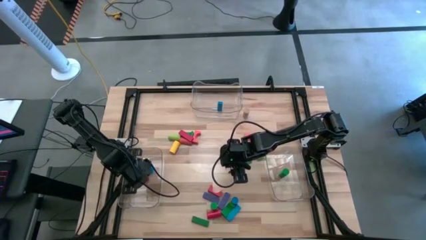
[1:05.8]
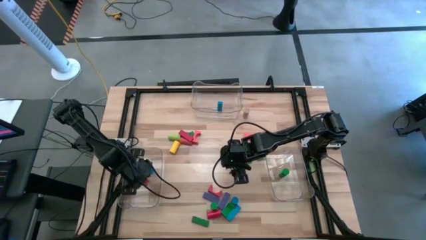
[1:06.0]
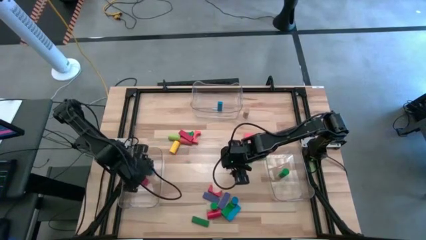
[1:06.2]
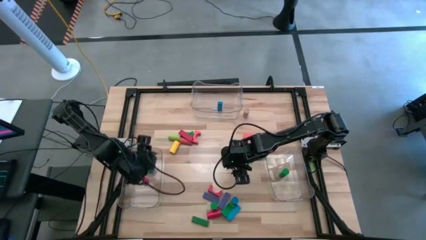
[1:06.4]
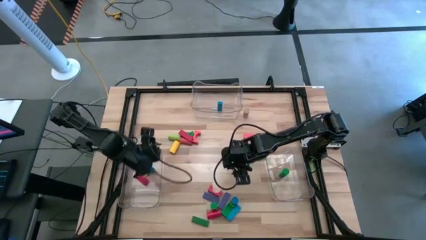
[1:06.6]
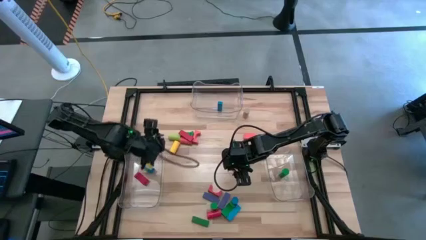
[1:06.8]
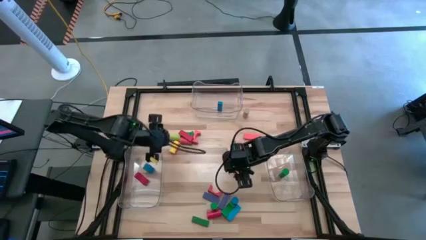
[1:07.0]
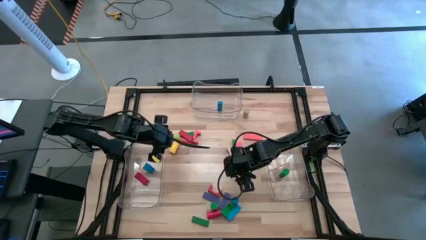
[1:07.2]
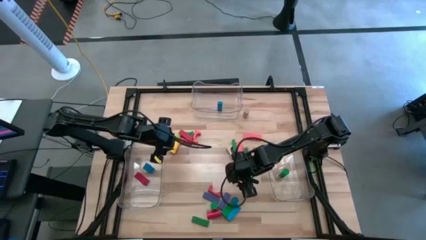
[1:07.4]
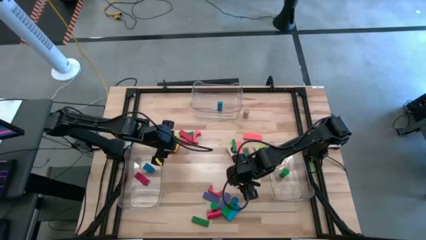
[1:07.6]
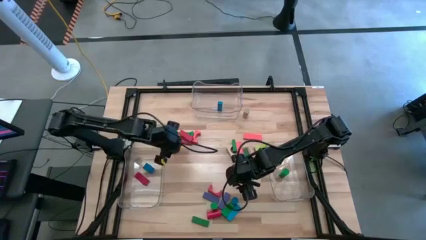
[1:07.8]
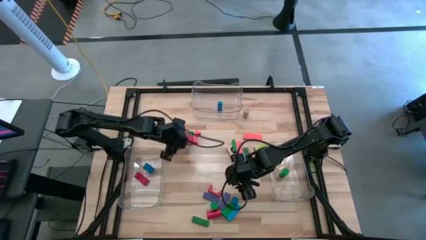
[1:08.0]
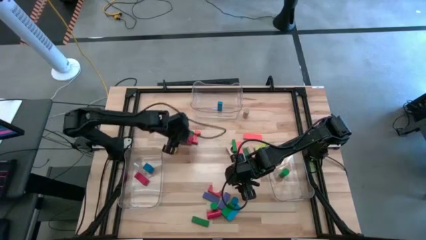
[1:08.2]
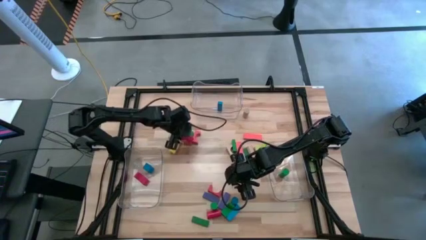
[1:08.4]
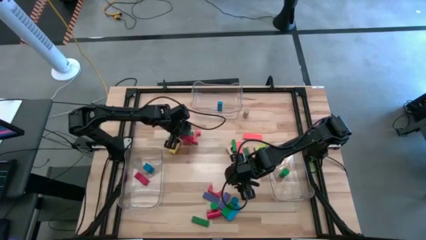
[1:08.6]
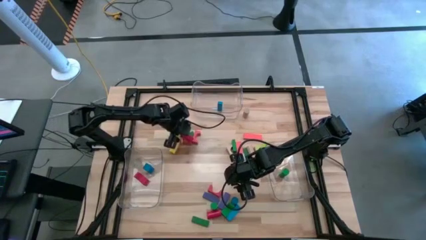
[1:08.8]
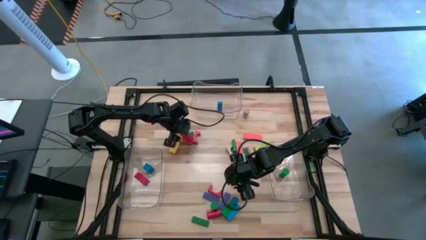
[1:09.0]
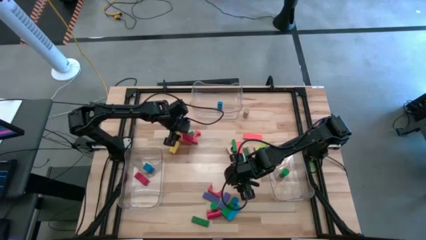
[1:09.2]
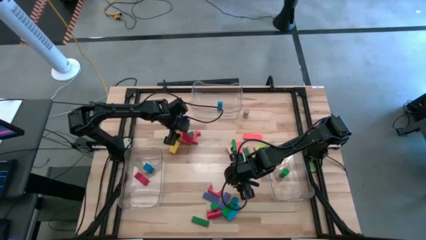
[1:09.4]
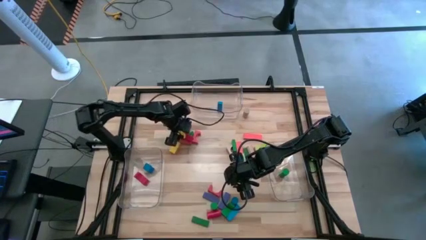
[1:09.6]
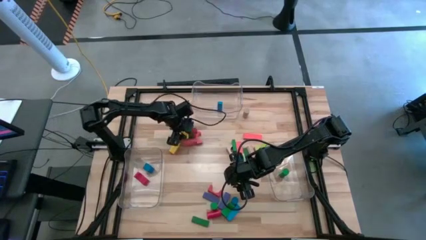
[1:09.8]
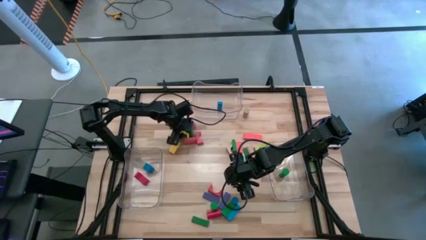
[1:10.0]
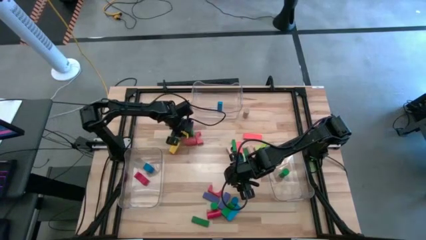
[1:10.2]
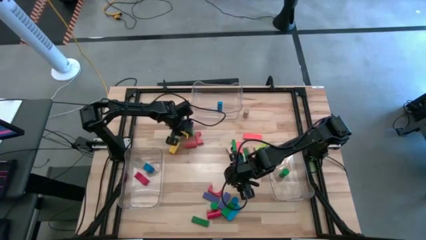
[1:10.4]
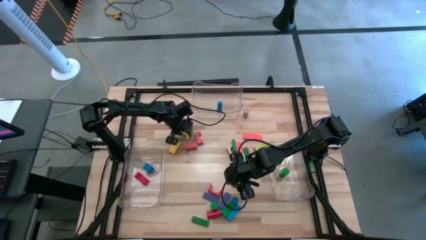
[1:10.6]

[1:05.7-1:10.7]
Task: Sort blocks by size
Put the red rectangular block into the top transparent bin

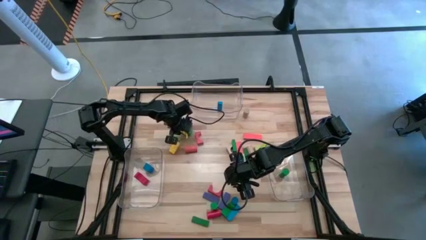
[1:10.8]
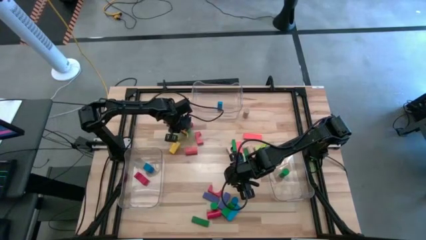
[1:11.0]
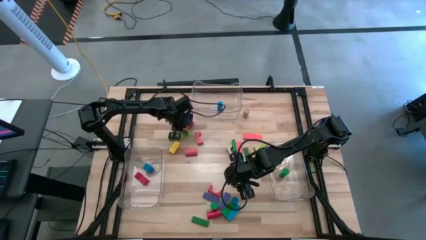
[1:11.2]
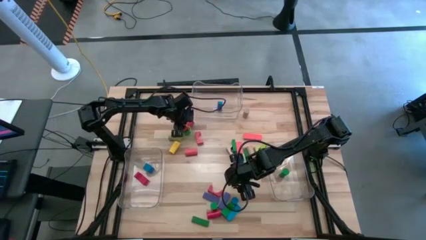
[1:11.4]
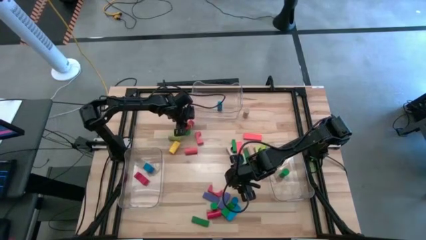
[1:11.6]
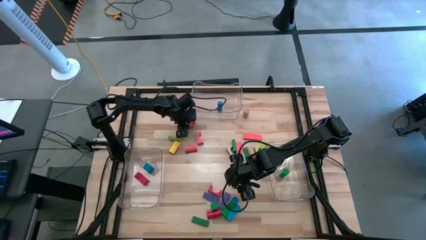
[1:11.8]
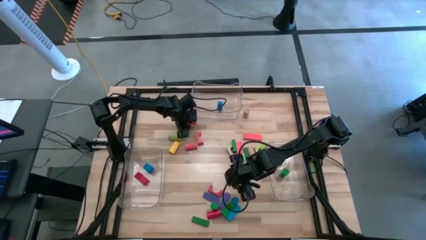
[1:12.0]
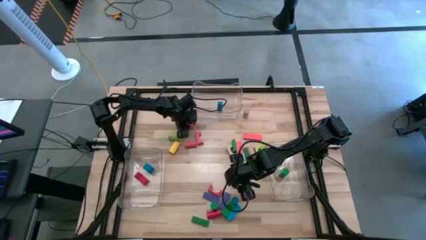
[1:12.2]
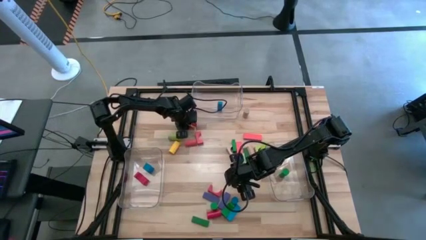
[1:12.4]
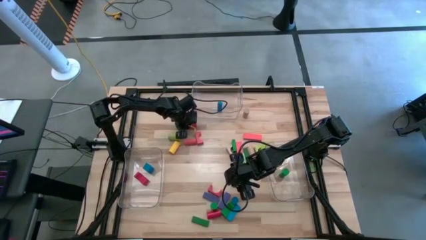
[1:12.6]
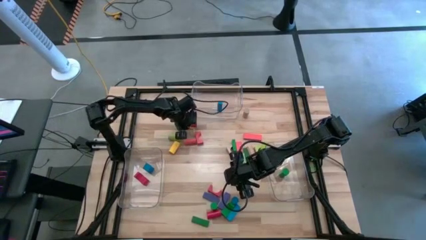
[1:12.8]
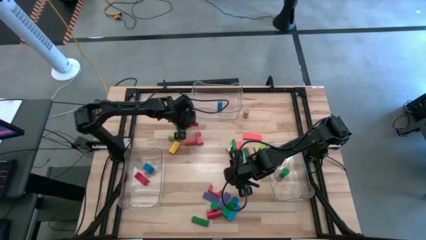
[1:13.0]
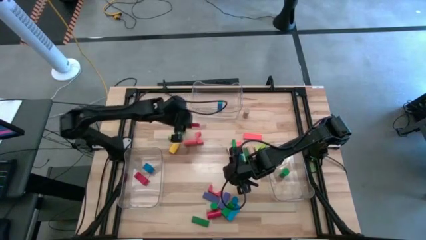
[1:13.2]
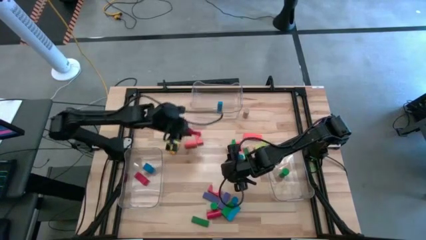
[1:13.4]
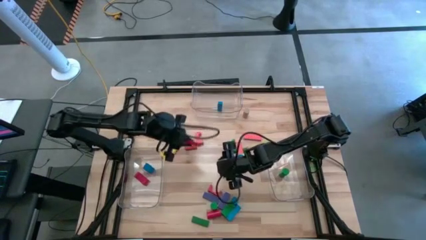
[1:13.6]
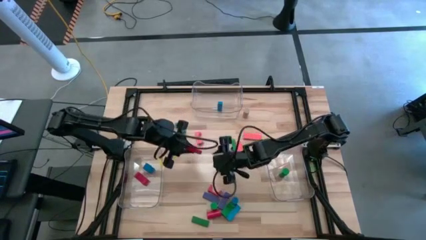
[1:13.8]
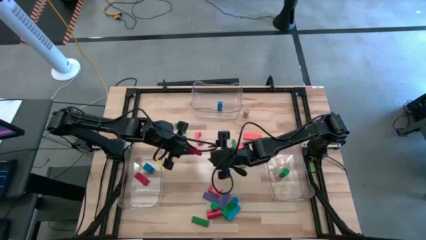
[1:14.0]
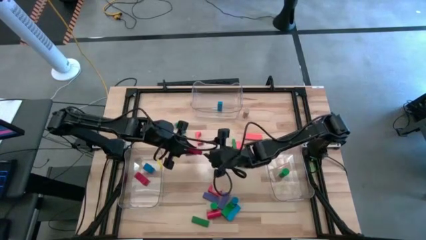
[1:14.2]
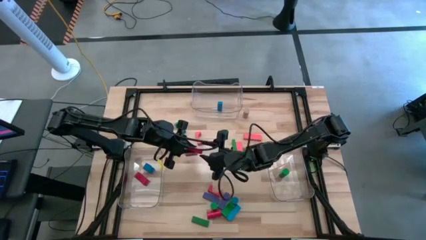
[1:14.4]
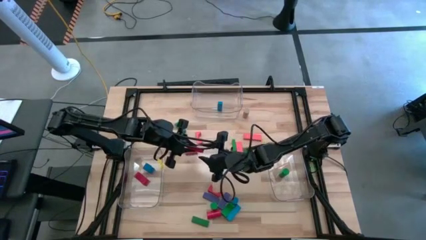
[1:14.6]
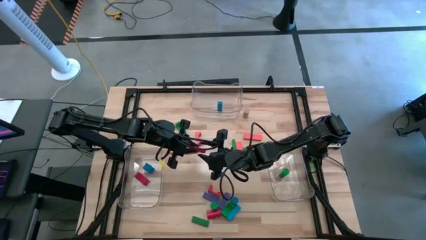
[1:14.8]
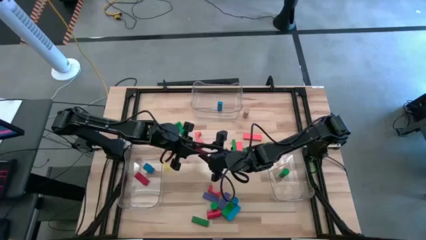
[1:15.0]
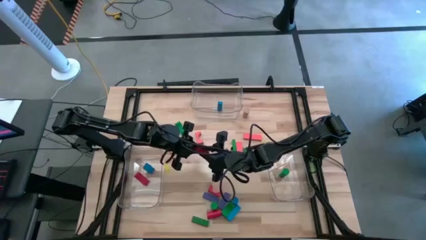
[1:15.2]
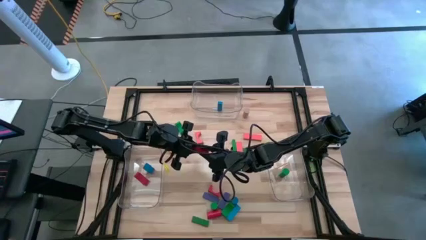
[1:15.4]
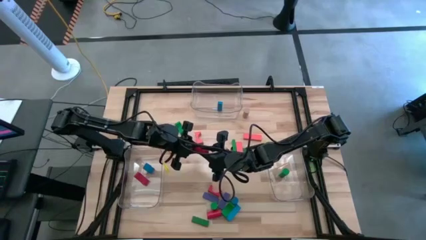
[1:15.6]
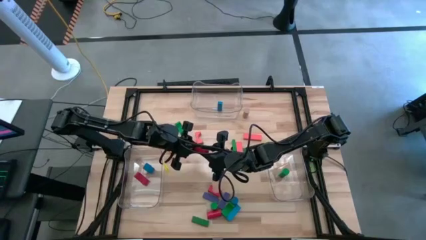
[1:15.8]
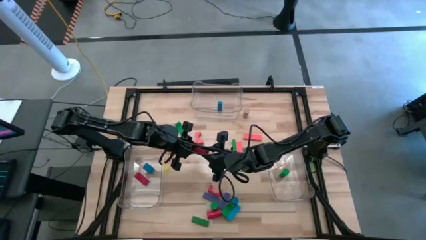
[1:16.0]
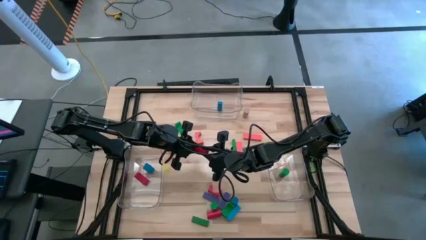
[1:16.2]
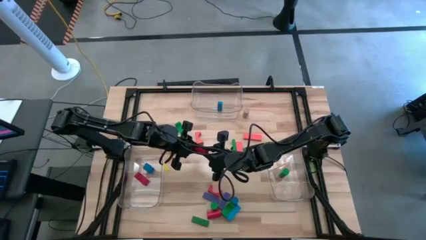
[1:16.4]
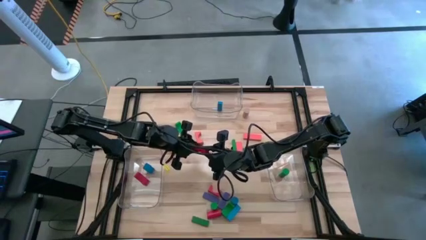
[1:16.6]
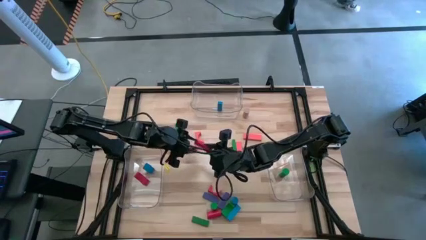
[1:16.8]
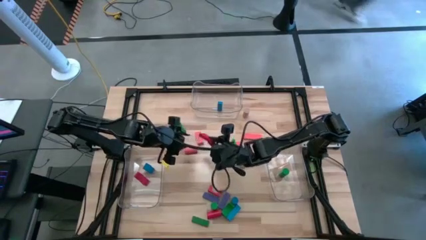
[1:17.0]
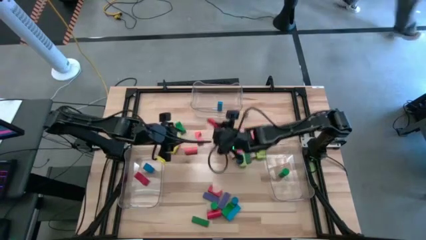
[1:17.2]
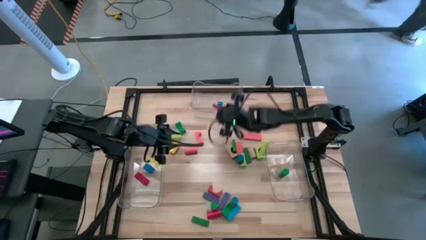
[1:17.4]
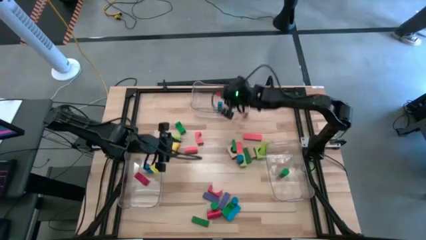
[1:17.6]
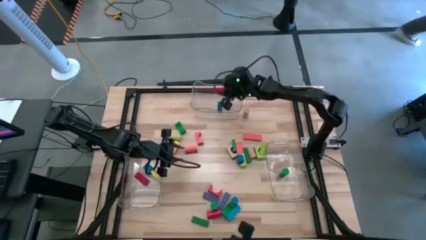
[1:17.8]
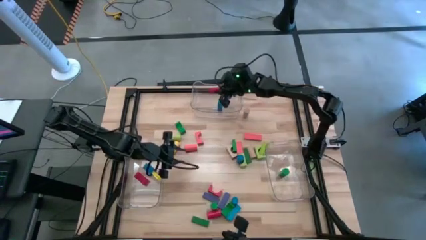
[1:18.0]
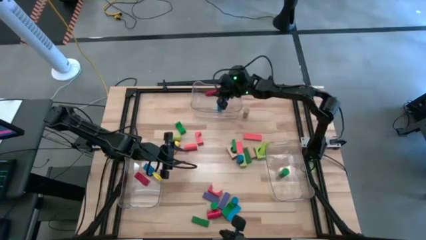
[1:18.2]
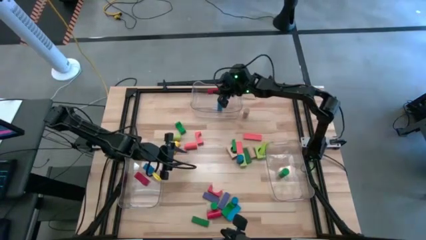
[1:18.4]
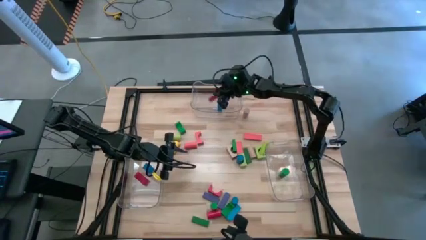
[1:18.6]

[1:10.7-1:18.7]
Put the red rectangular block into the top transparent bin
